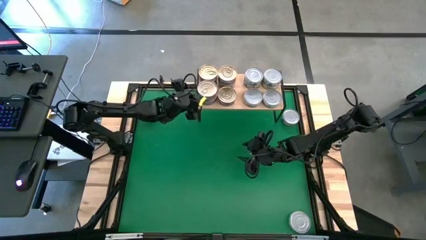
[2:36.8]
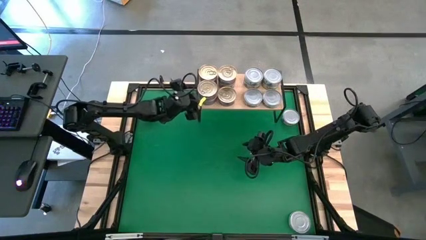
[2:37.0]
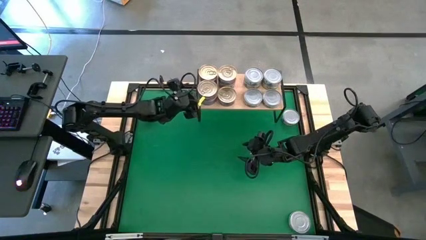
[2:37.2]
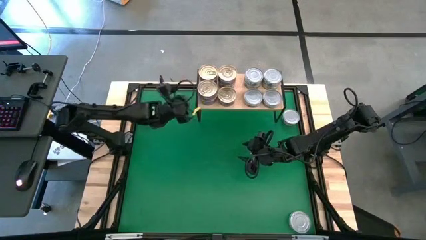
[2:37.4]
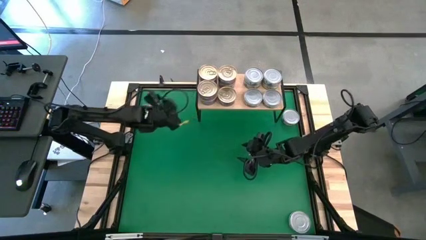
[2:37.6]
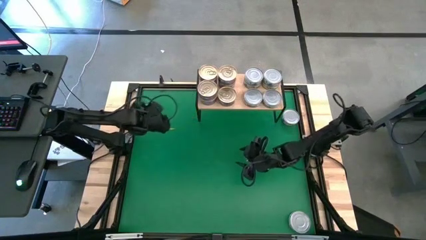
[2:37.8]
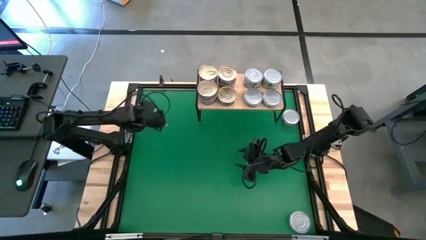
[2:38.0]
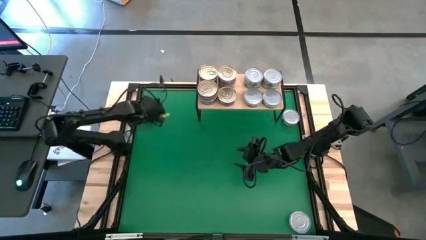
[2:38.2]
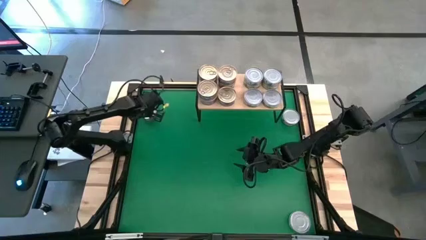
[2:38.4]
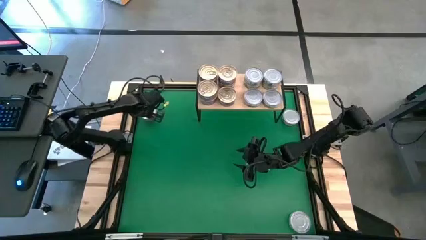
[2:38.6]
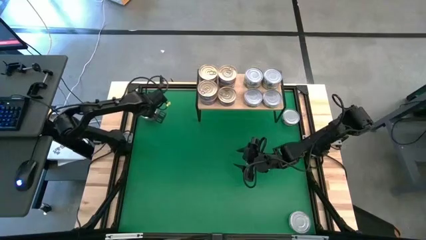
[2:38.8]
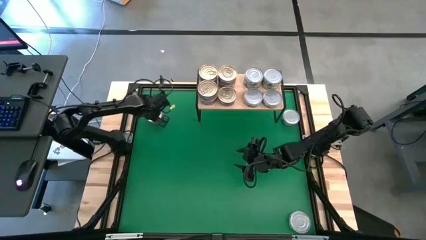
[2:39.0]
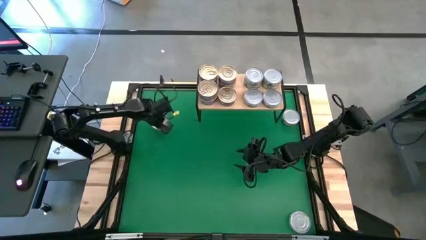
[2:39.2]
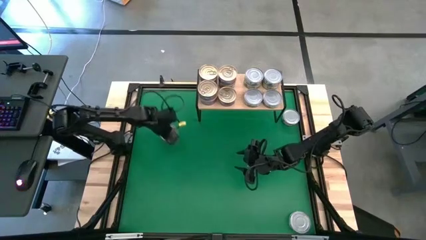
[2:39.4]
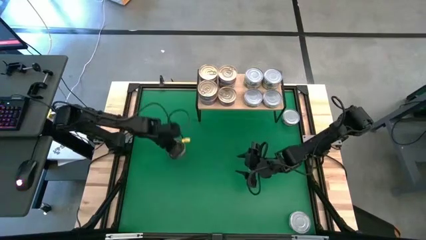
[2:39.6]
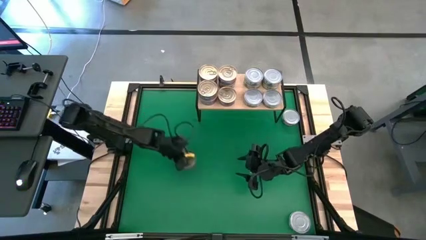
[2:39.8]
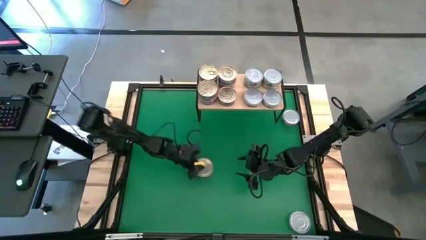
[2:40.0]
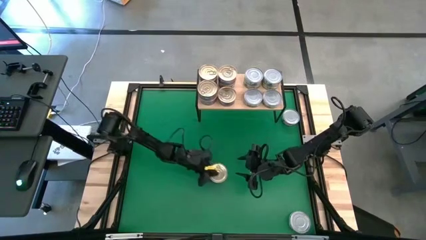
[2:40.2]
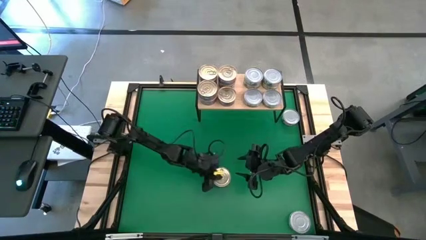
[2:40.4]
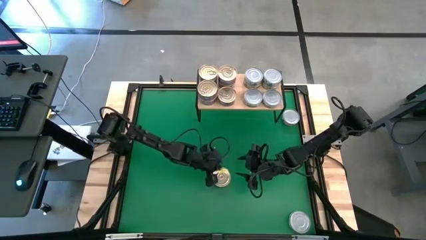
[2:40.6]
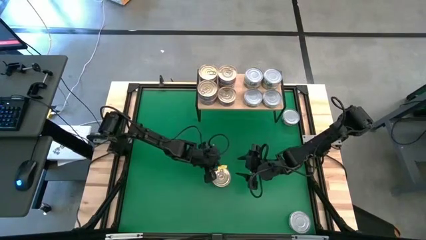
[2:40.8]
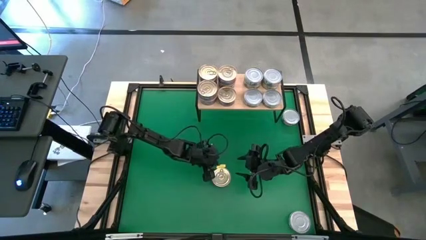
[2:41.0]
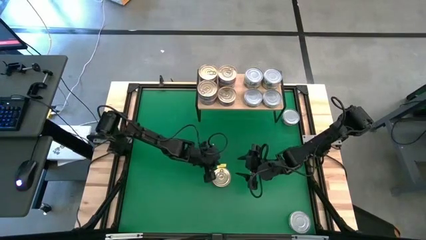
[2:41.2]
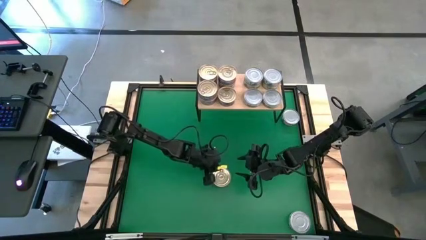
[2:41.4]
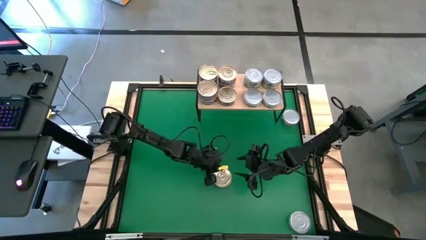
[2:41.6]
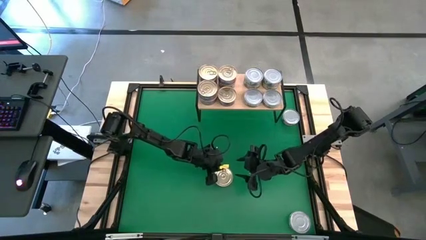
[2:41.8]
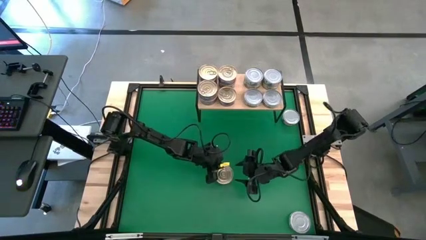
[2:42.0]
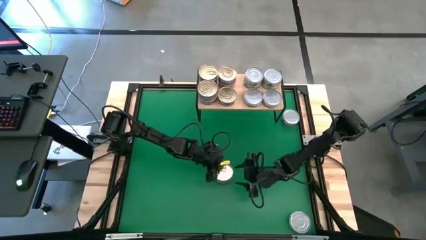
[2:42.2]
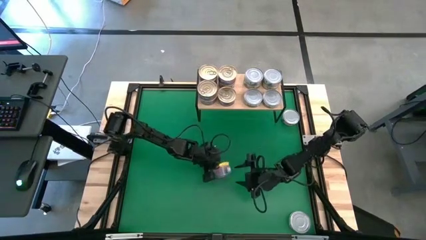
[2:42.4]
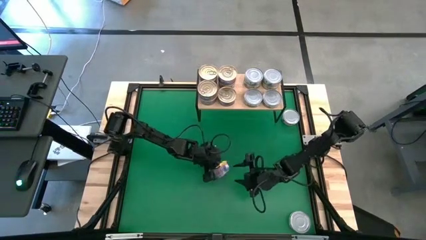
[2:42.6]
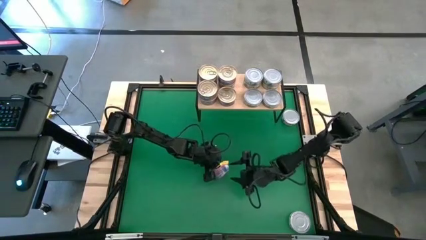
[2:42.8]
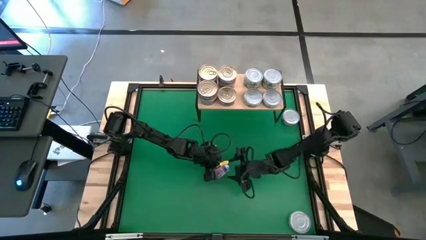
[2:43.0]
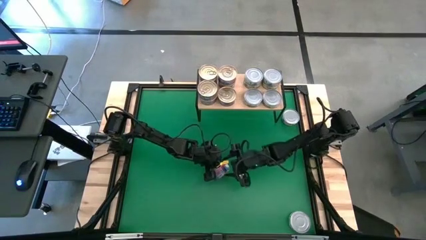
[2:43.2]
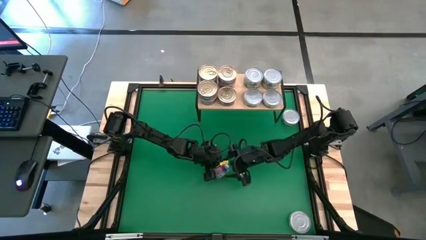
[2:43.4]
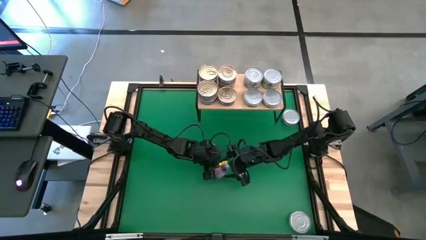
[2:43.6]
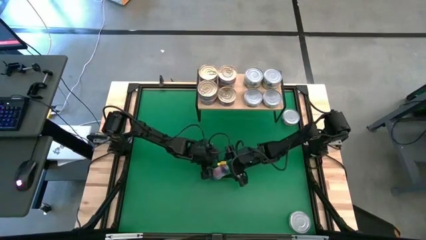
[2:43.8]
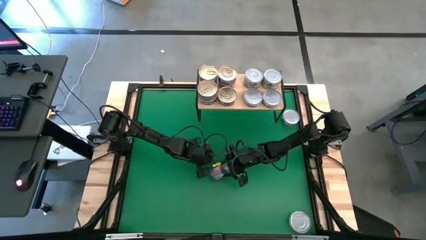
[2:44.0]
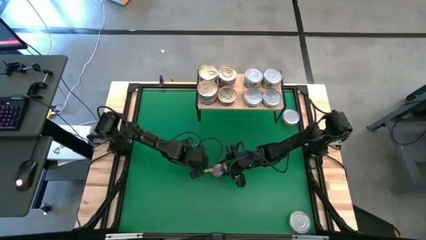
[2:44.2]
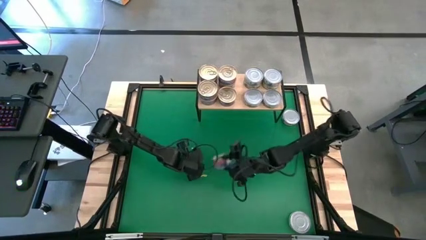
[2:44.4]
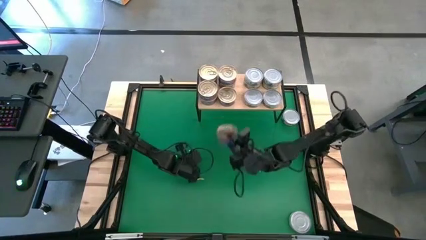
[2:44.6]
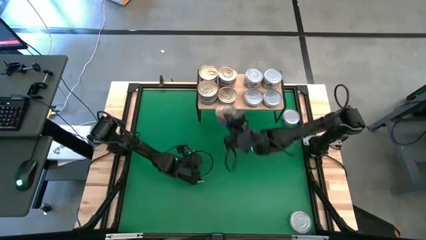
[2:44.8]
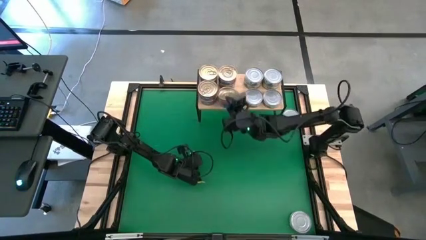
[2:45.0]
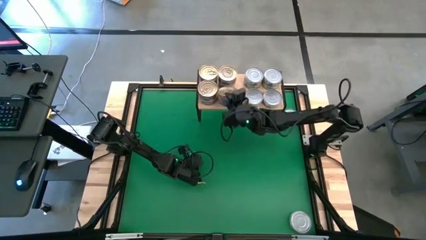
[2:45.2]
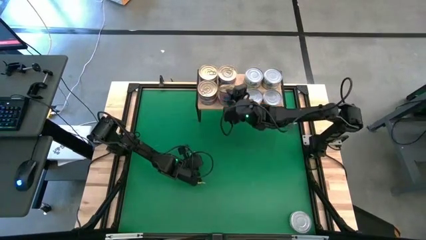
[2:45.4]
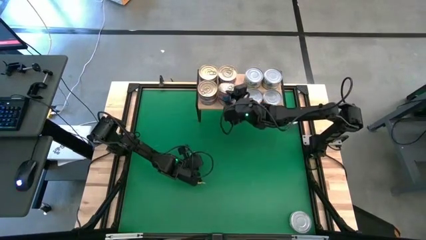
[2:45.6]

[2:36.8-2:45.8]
Task: Stack canned seafood by type on shelf
Stack the blue pink tuna can on top of the blue pink tuna can on the shelf

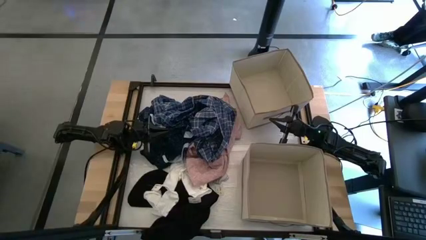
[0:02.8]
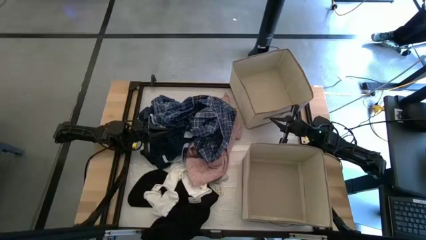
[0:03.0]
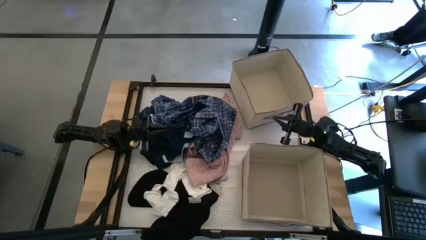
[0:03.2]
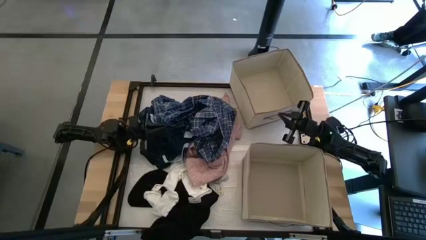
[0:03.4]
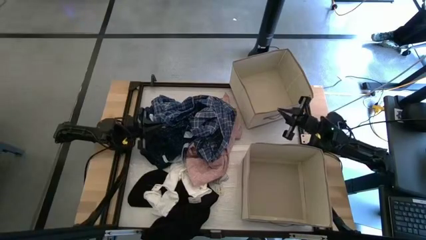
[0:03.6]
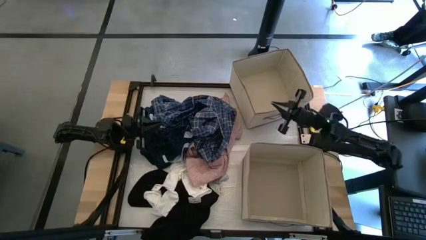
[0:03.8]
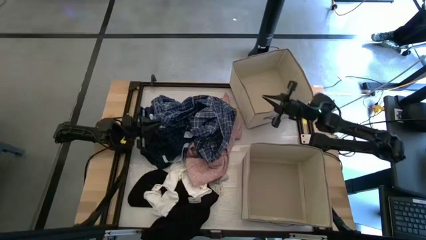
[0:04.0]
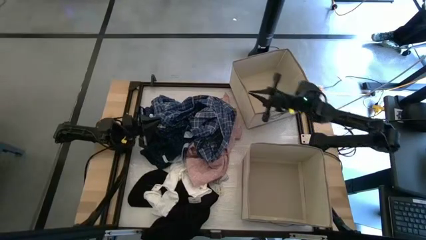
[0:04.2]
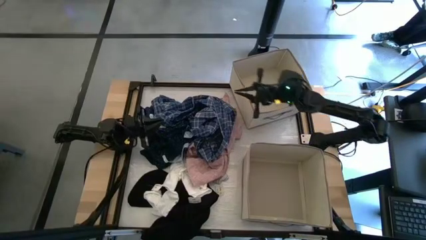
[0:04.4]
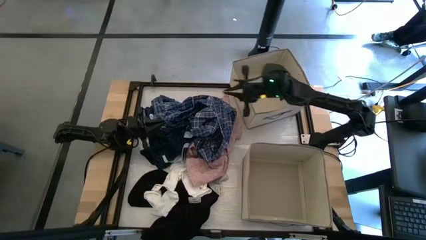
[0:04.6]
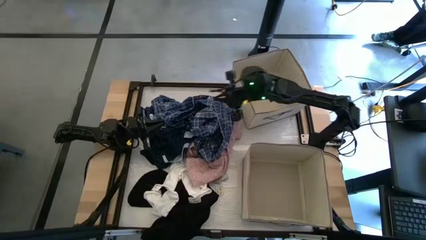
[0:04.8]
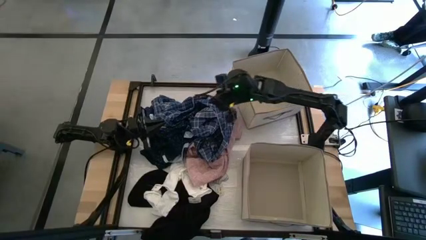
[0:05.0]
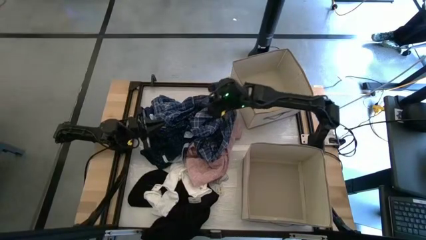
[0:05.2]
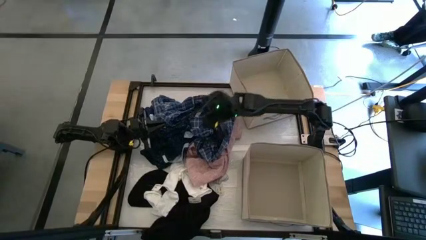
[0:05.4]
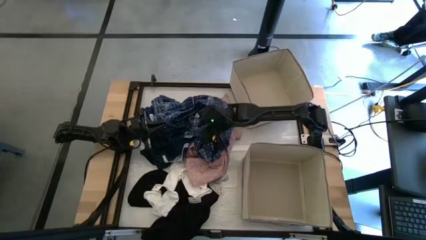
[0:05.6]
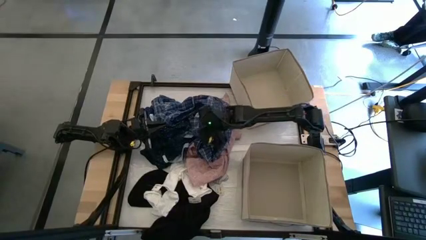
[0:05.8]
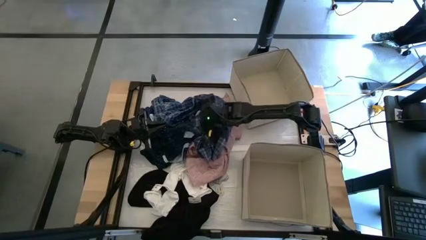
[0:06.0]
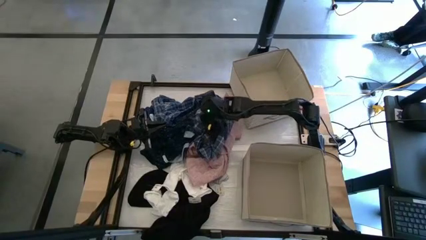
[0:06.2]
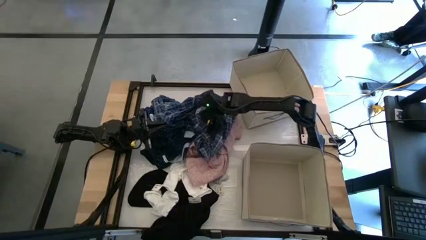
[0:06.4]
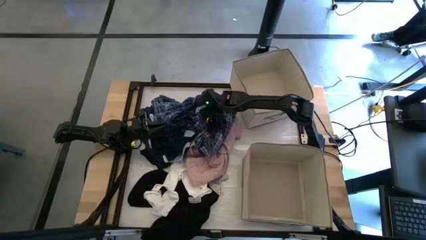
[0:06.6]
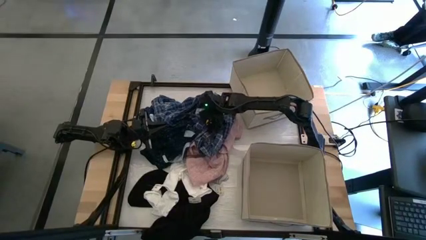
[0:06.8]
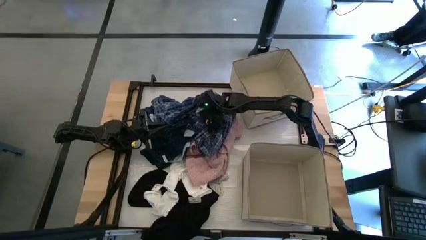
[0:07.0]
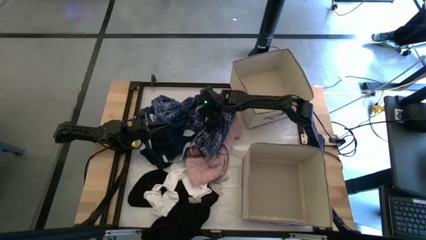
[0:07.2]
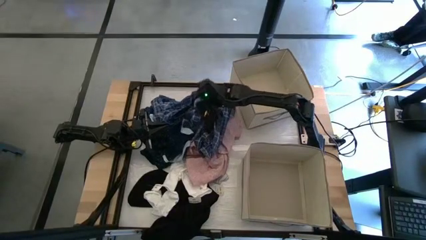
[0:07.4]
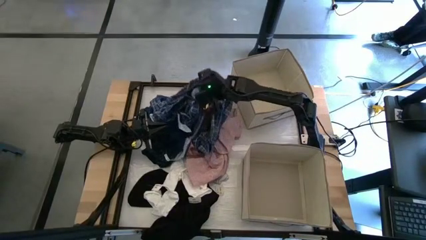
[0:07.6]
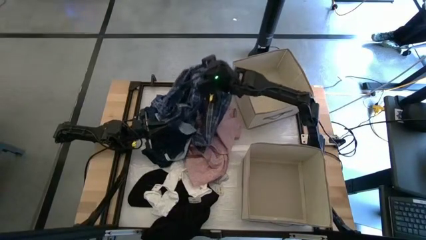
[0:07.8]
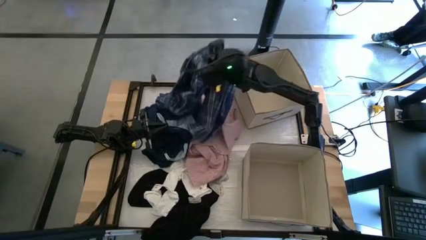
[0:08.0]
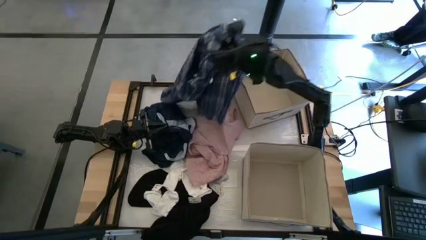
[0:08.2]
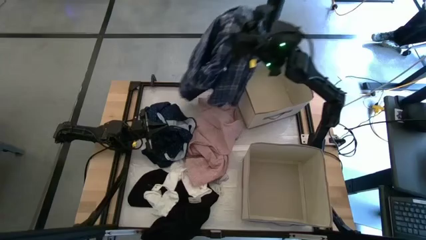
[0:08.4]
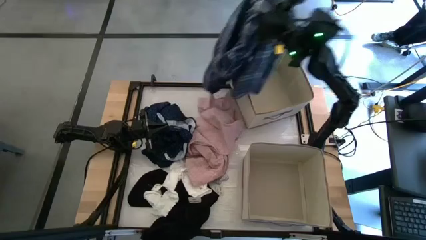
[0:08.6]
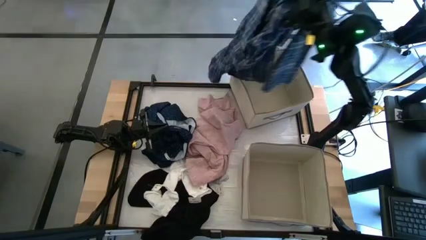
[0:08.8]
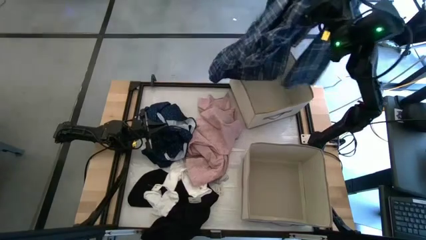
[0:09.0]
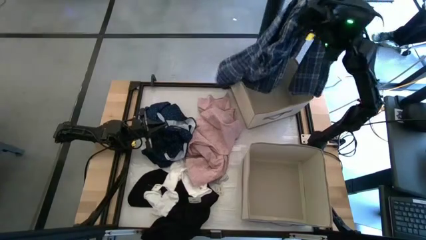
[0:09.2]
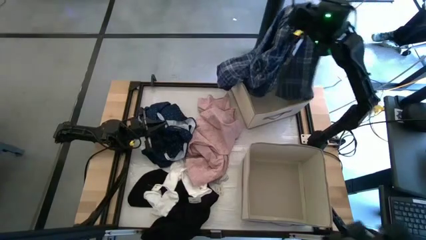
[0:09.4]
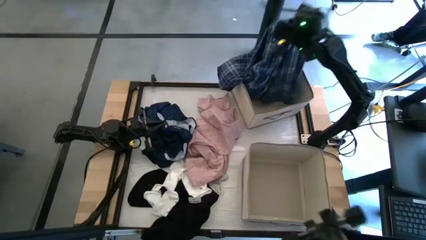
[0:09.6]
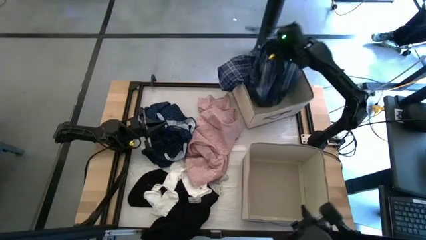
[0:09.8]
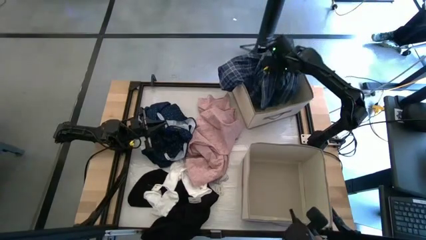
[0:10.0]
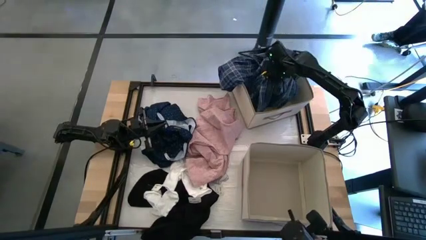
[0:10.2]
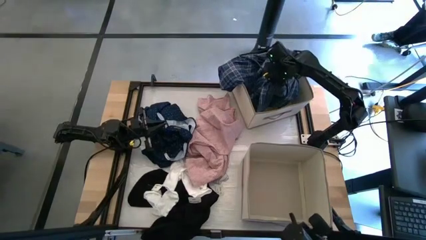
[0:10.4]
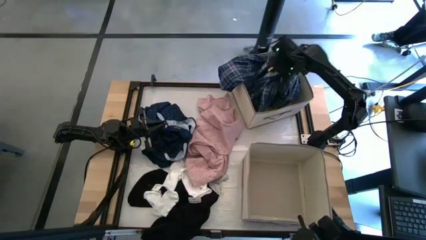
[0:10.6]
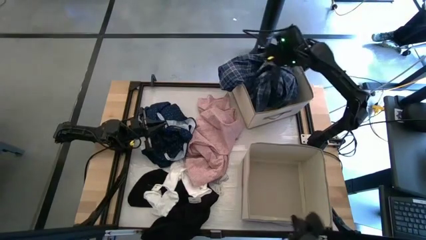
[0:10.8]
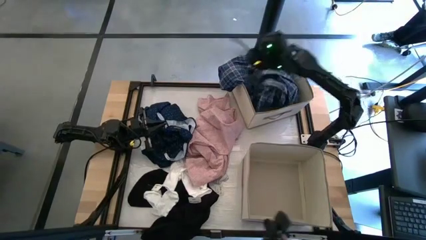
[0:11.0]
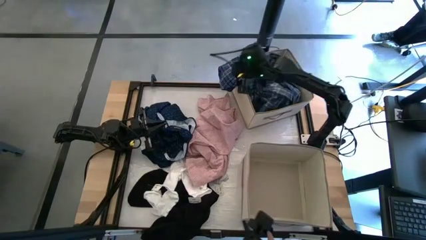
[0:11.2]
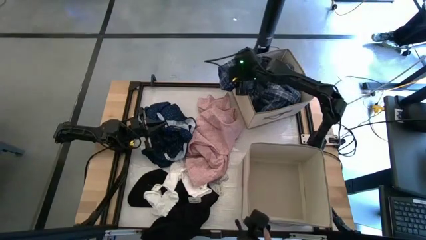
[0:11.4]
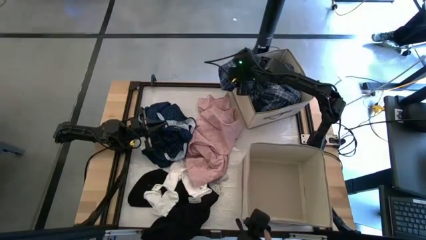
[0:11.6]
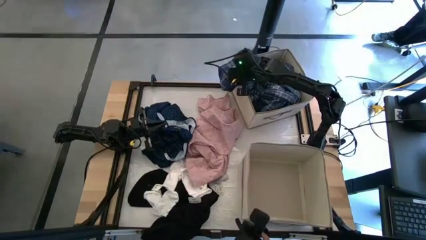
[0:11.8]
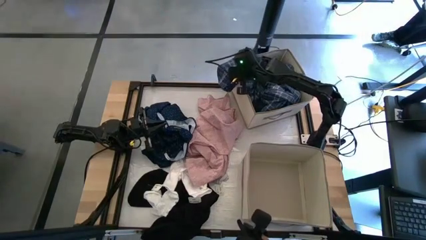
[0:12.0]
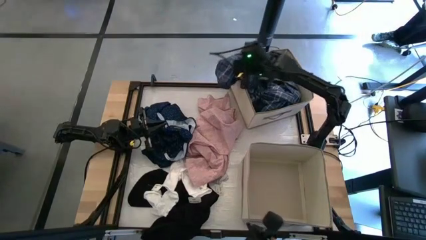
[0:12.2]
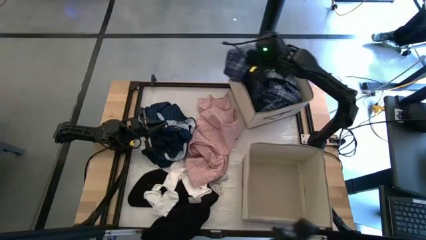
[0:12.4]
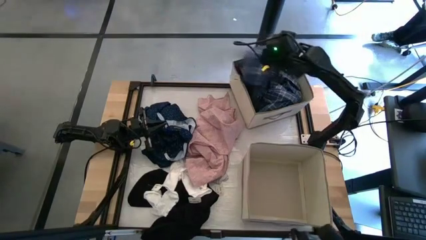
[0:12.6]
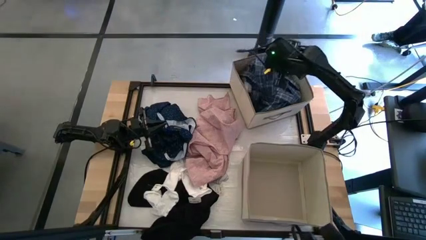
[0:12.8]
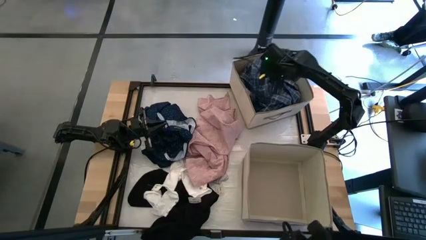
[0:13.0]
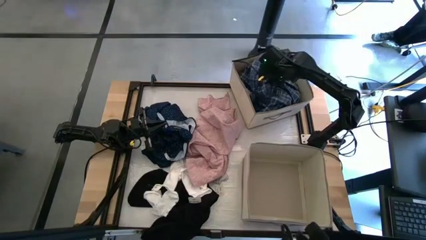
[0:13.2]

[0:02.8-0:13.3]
Task: Sort clothes
Put the blue checkered polo shirt into the top laundry organizer
